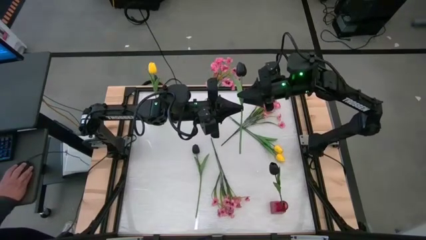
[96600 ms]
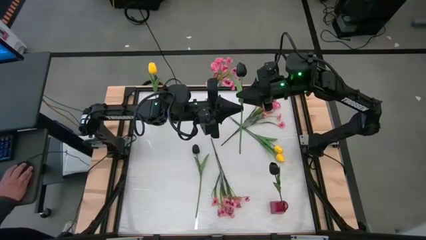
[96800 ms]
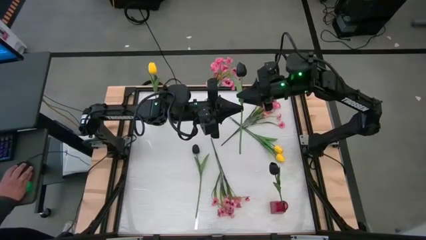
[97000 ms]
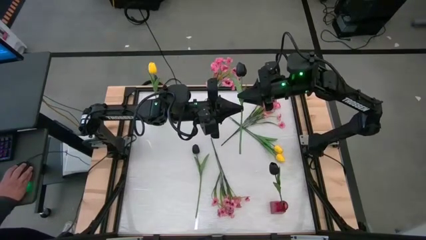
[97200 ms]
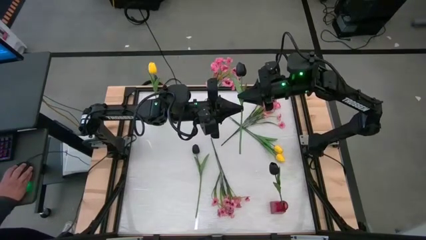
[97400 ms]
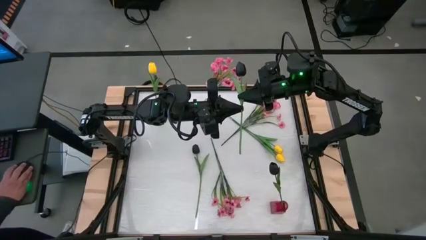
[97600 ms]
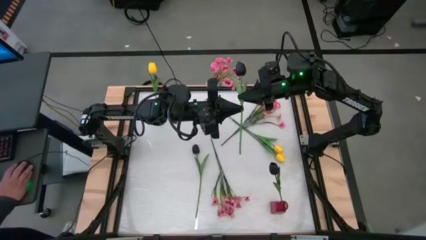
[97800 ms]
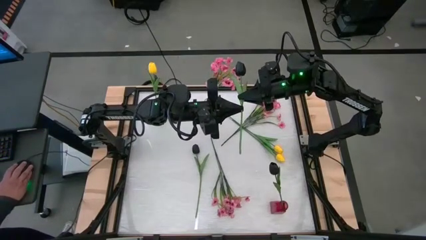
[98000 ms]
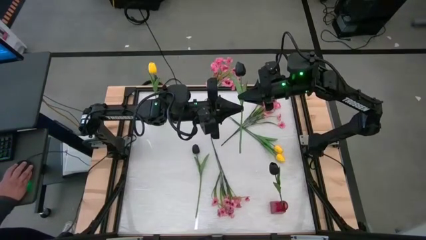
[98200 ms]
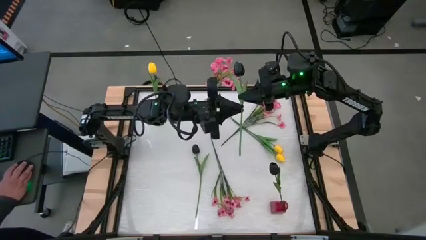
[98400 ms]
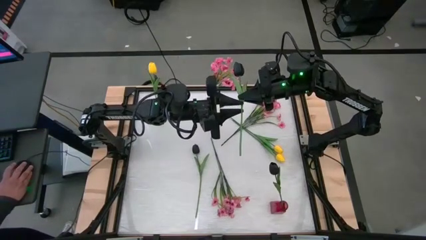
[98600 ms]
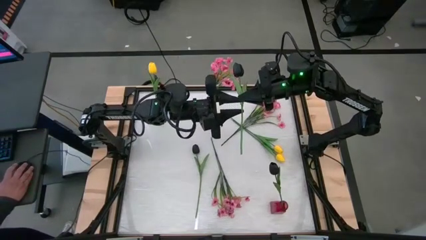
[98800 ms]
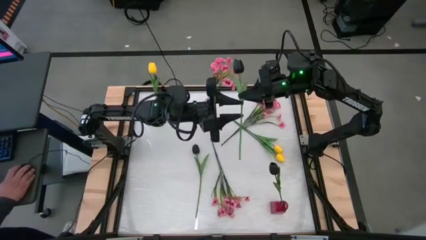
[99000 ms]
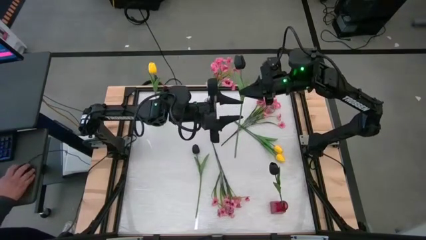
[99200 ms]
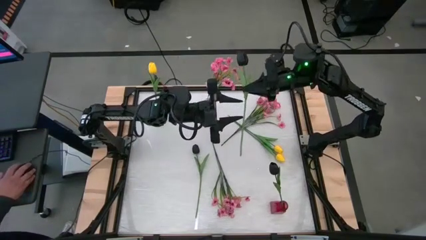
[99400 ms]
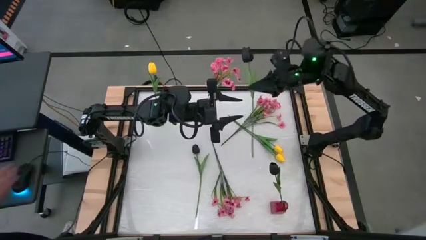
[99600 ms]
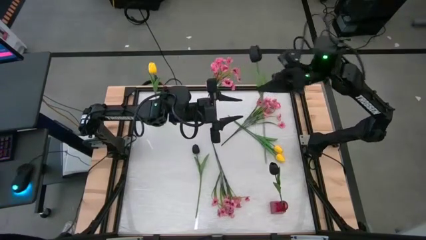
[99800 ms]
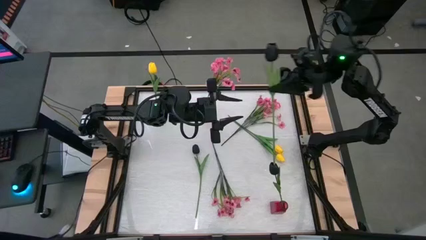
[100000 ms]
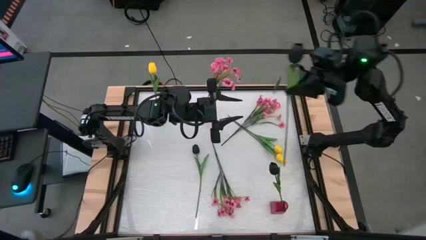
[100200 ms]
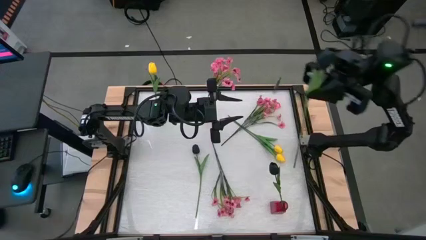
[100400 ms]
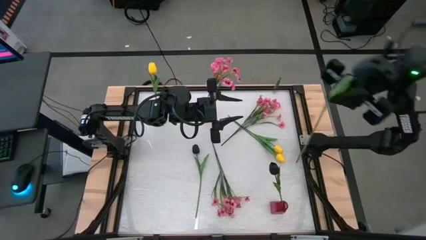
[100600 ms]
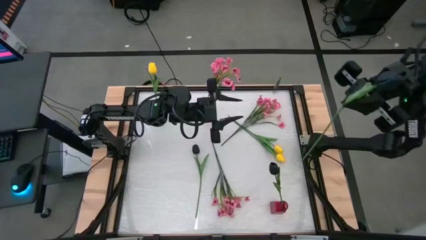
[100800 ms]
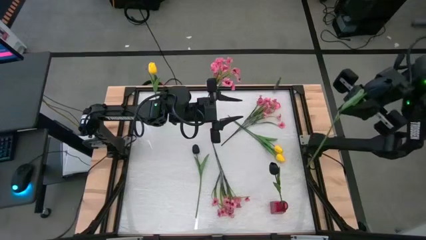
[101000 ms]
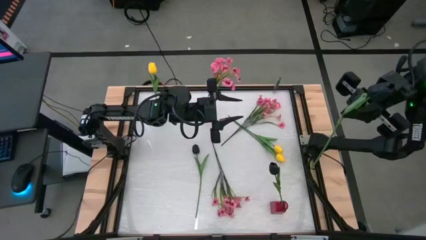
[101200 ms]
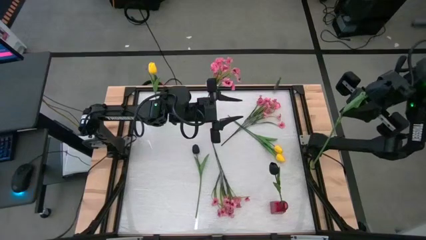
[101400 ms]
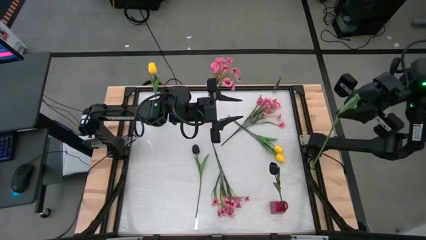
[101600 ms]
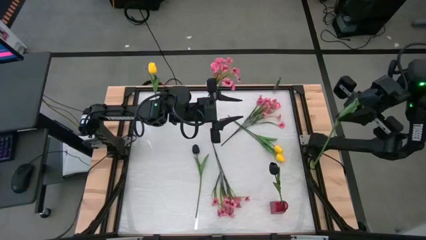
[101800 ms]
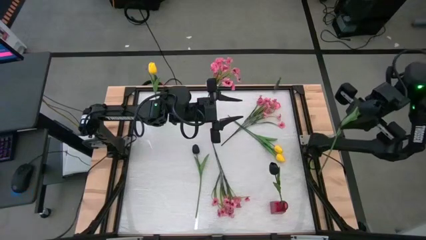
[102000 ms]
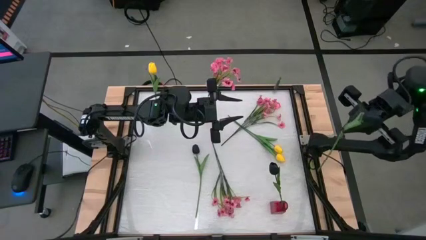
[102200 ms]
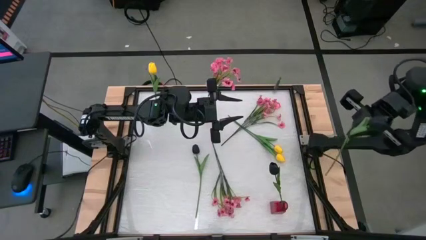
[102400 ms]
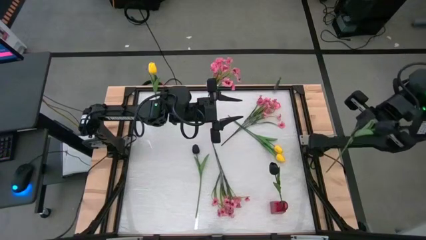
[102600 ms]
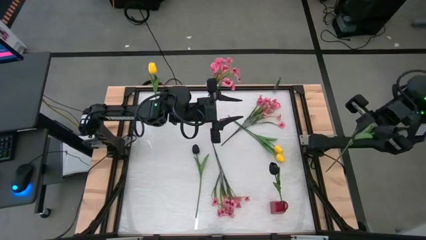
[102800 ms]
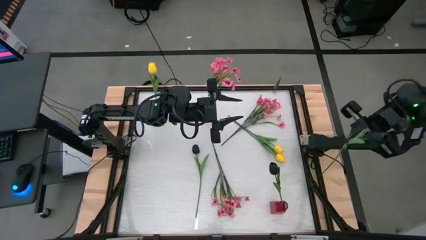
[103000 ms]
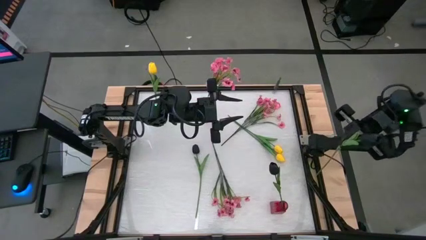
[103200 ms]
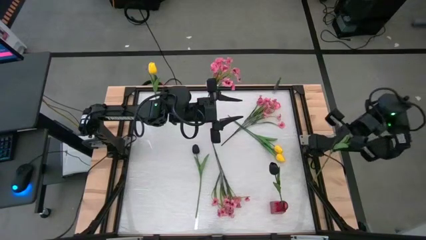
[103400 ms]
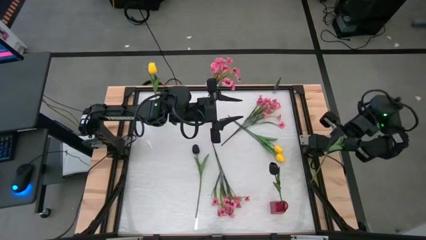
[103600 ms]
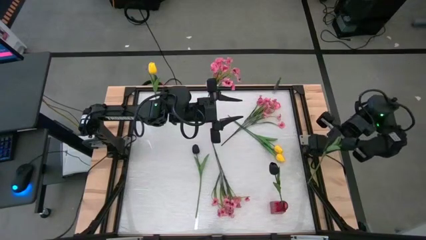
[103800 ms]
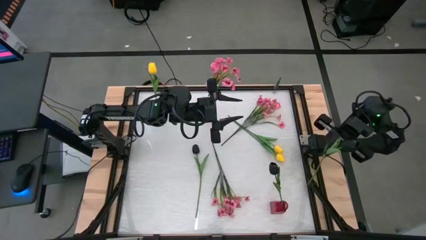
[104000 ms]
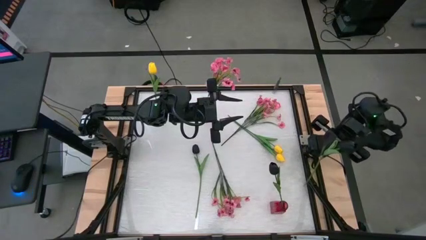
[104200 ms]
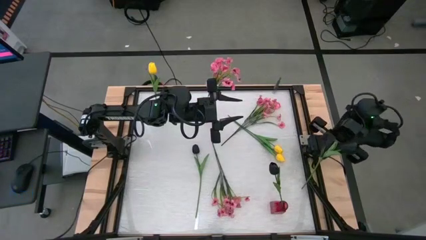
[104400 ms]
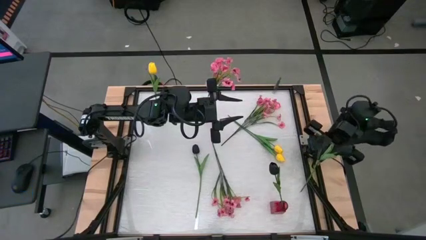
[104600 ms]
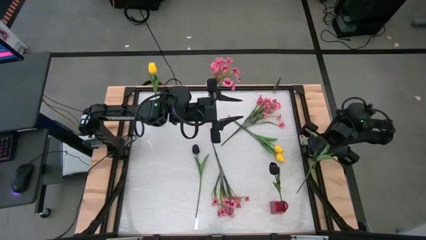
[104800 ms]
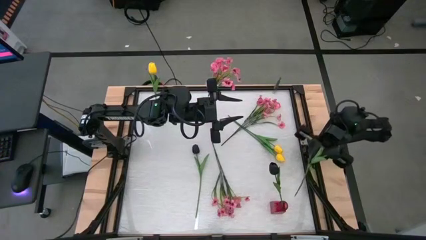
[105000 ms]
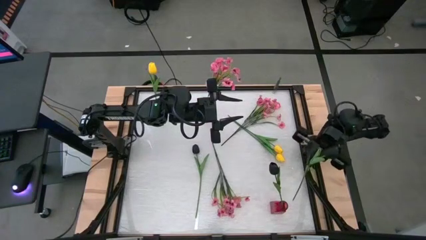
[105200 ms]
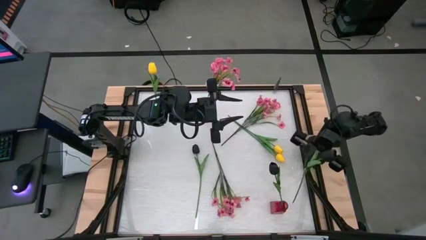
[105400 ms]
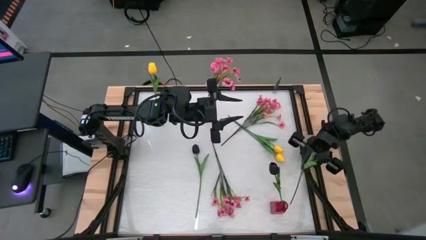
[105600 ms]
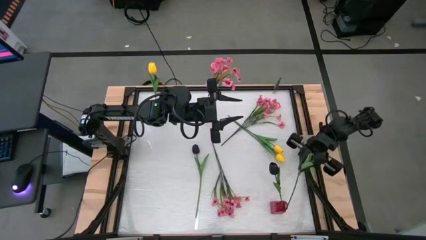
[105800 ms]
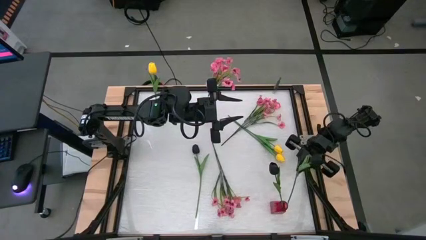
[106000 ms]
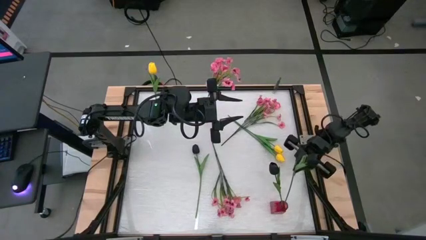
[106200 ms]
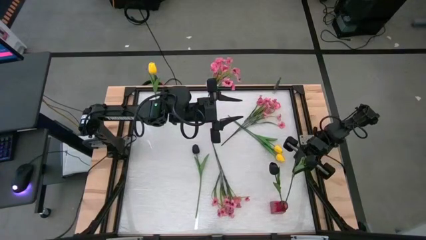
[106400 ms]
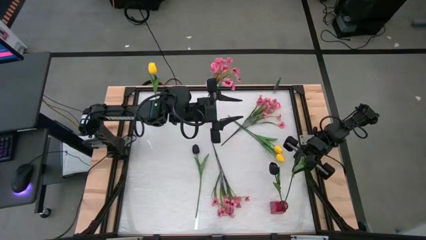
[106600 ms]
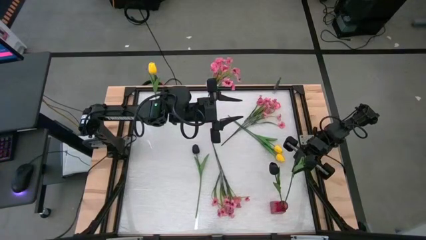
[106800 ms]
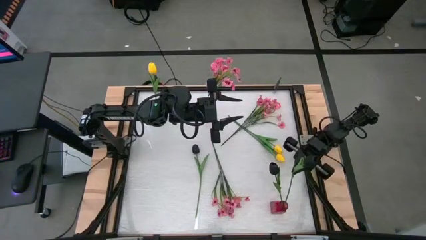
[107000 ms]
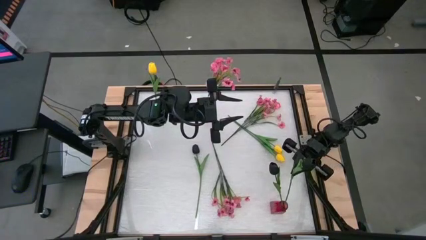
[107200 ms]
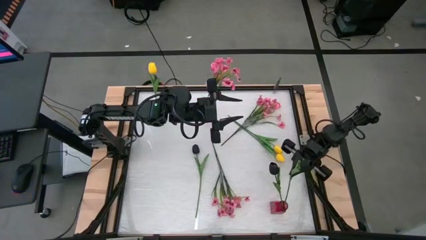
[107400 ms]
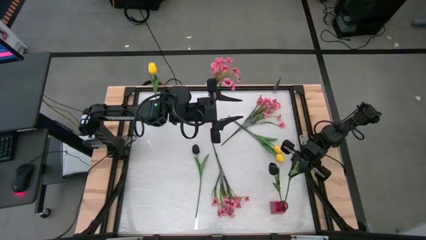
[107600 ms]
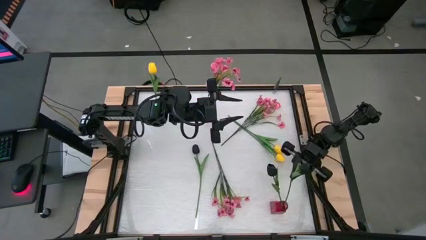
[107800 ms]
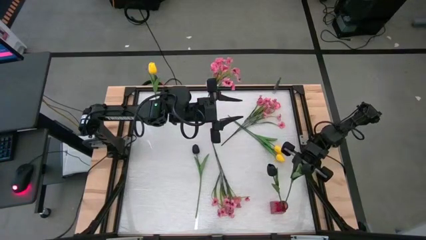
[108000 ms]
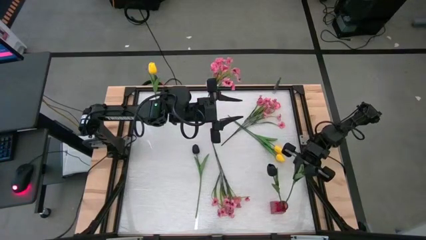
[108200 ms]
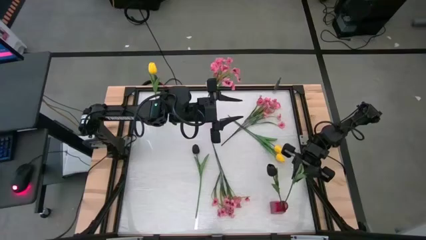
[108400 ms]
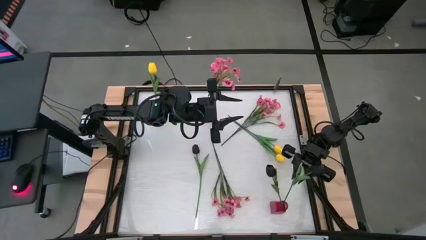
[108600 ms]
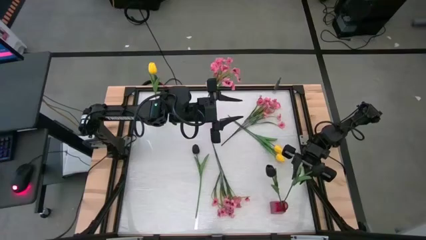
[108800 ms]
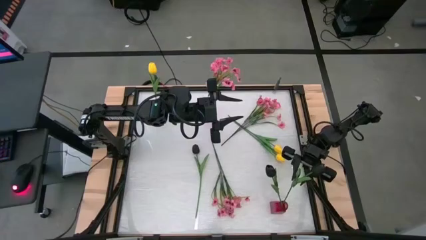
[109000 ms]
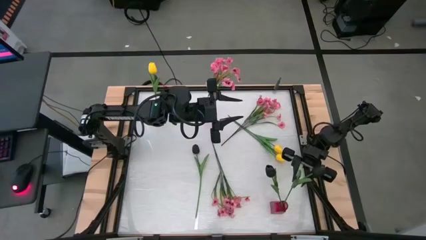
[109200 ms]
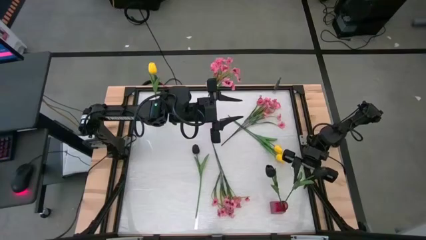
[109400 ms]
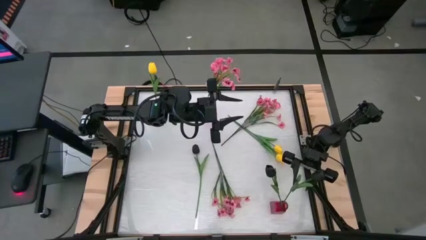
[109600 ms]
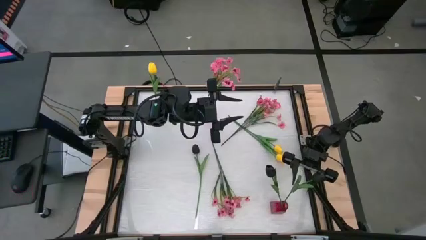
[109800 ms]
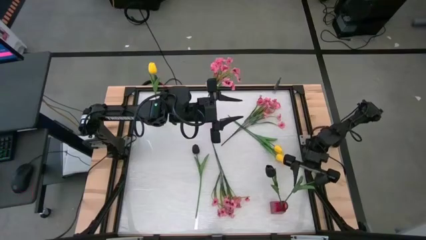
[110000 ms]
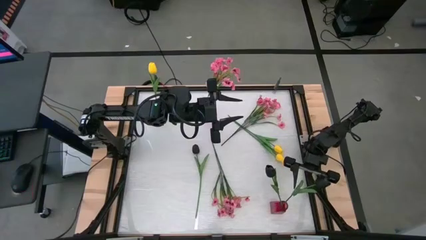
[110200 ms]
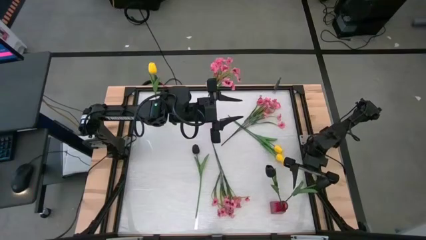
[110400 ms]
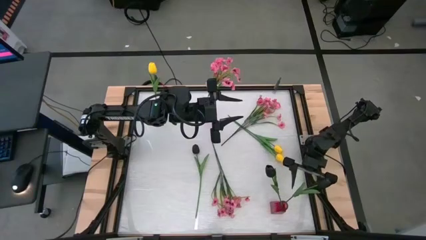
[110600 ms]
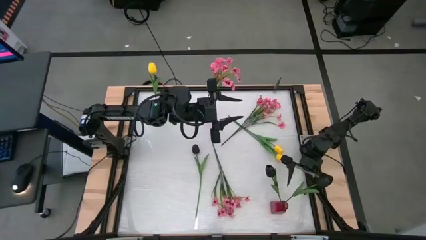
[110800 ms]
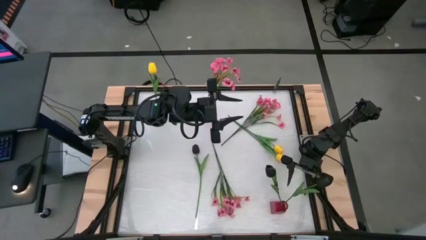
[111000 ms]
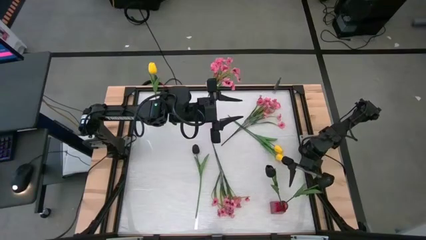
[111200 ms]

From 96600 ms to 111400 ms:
Task: Sort flowers into vase by color
Put the left black flower into the red vase

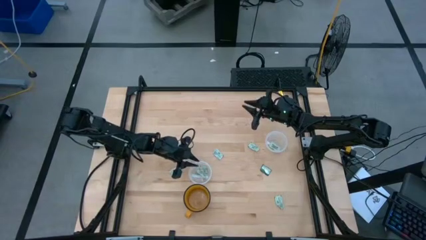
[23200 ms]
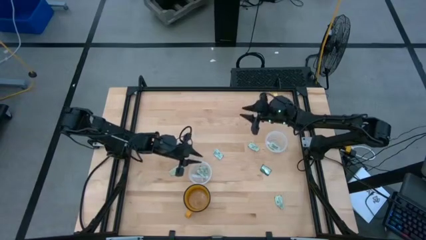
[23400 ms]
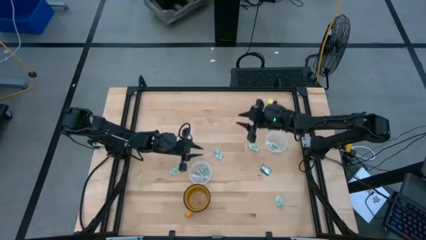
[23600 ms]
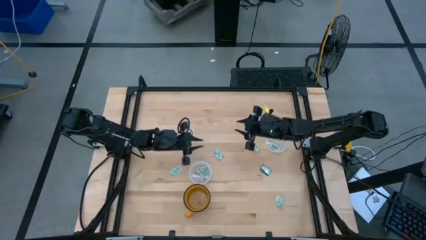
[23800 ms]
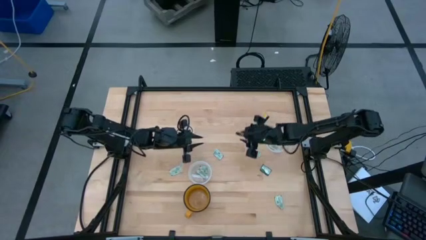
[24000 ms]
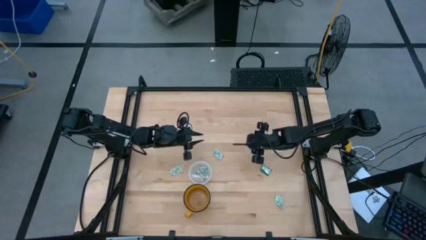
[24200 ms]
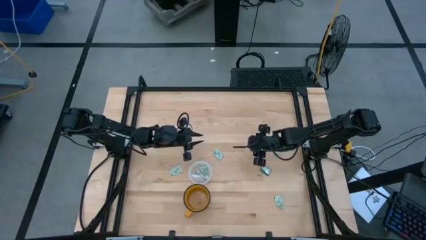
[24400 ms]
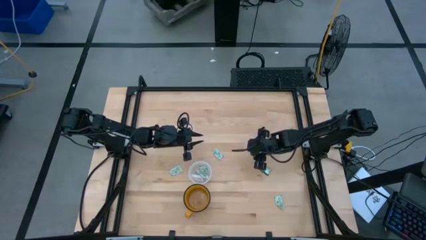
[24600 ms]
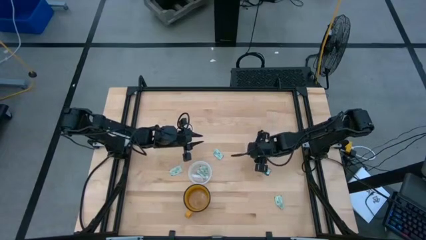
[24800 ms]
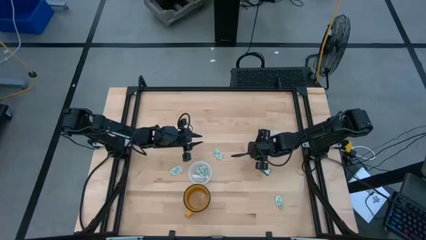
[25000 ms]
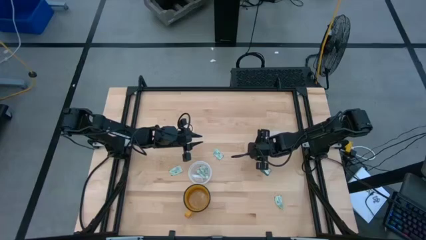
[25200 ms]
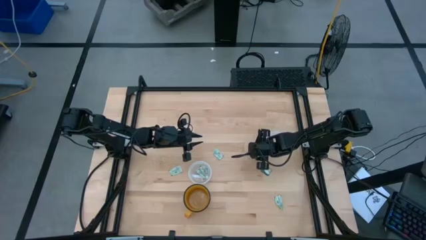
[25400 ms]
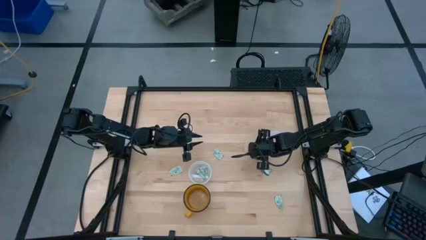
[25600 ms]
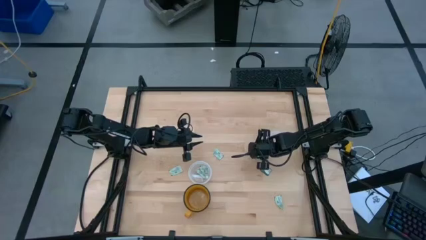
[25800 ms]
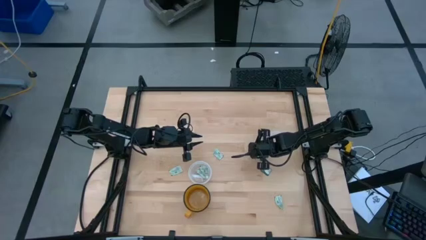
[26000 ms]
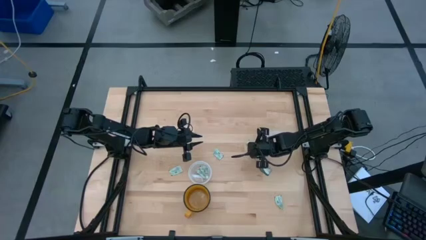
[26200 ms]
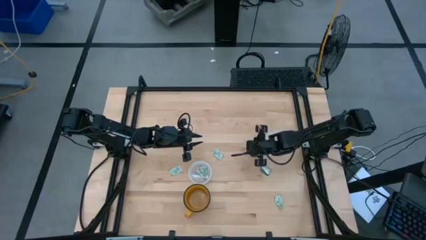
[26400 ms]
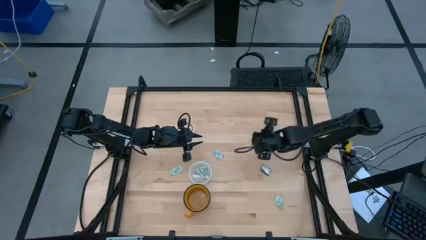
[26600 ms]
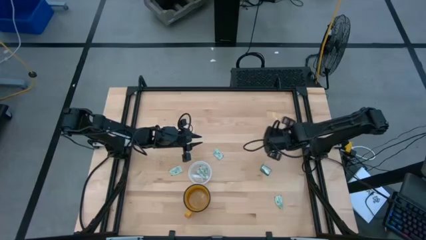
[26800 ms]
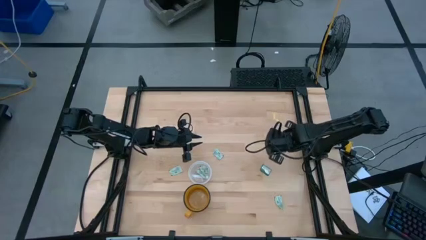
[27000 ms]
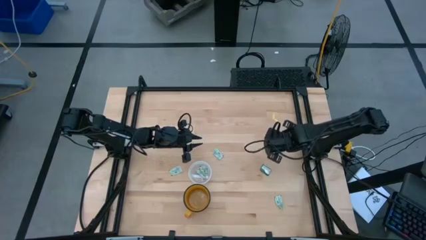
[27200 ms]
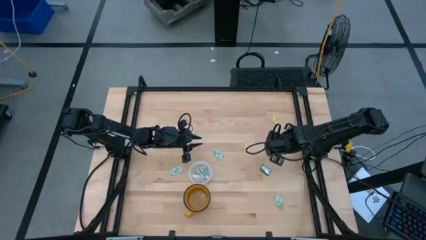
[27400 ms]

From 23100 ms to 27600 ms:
Task: Pick and place items into bin
Put the stevia packet into the right transparent bin
